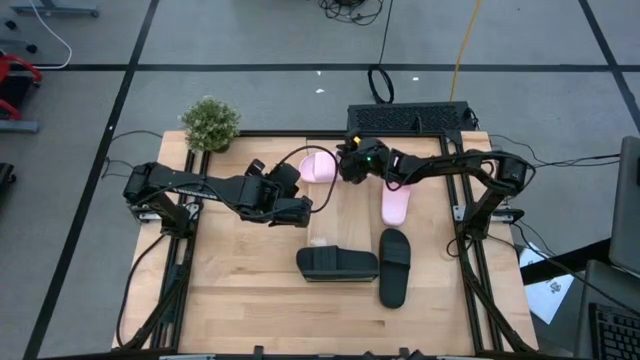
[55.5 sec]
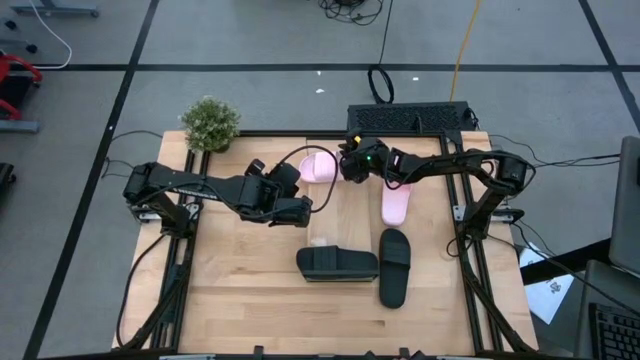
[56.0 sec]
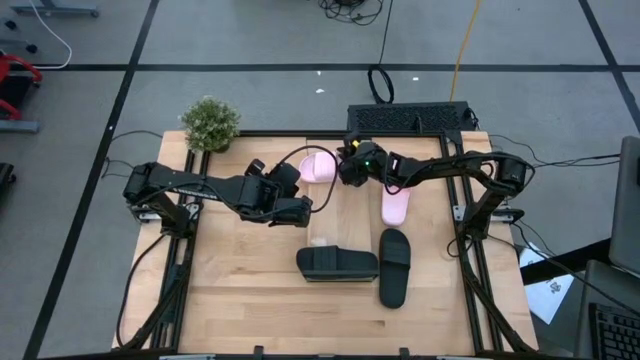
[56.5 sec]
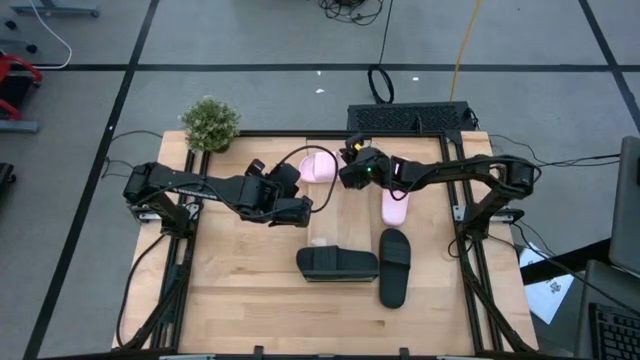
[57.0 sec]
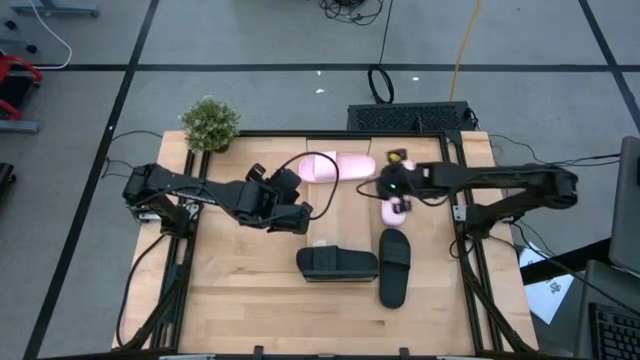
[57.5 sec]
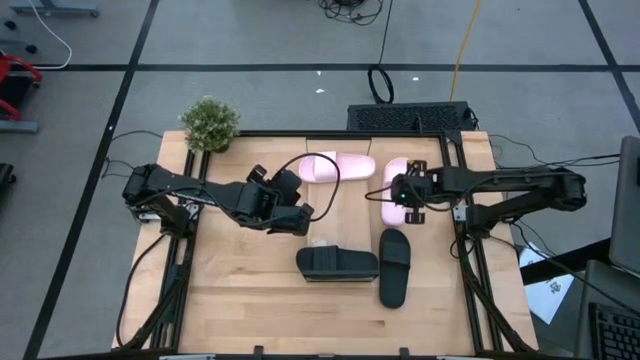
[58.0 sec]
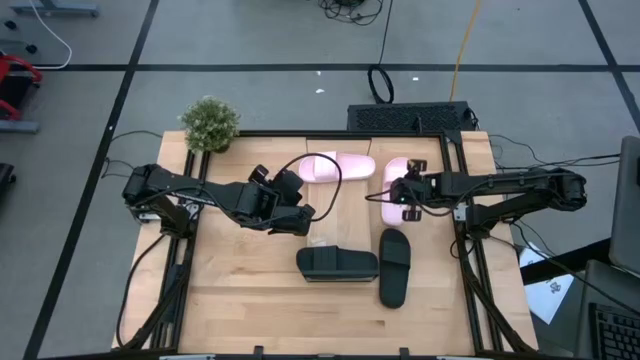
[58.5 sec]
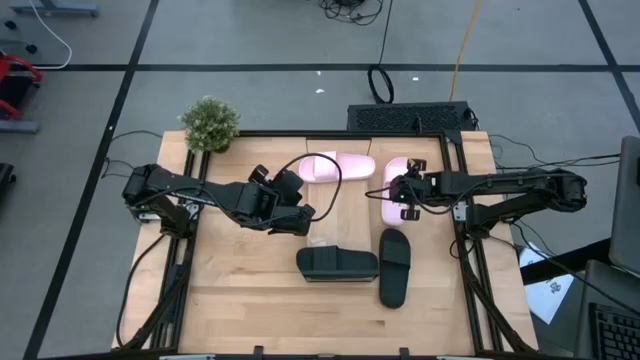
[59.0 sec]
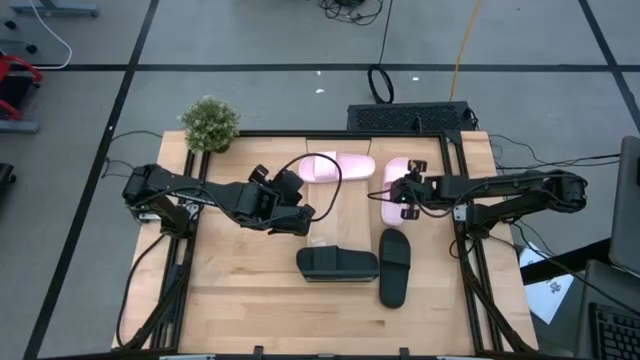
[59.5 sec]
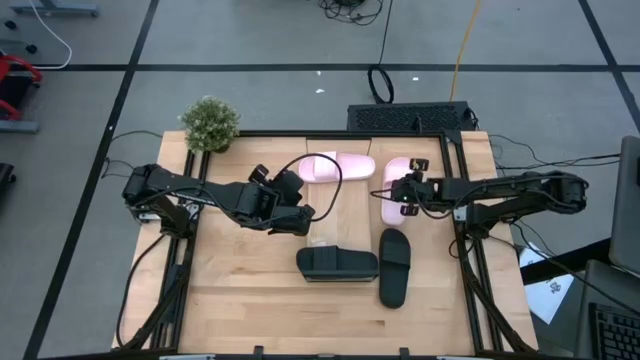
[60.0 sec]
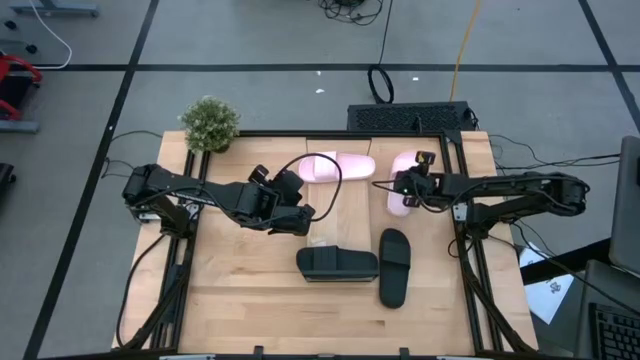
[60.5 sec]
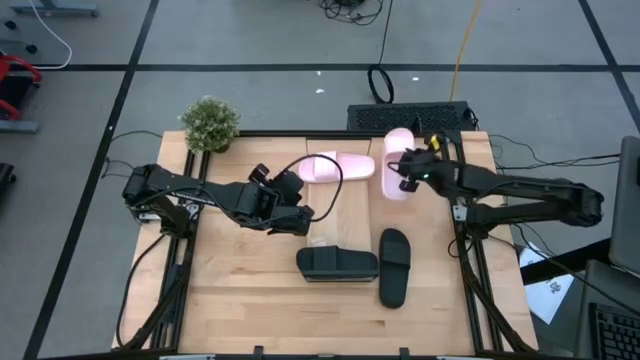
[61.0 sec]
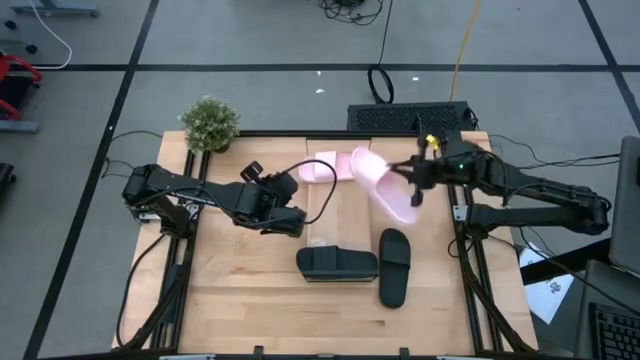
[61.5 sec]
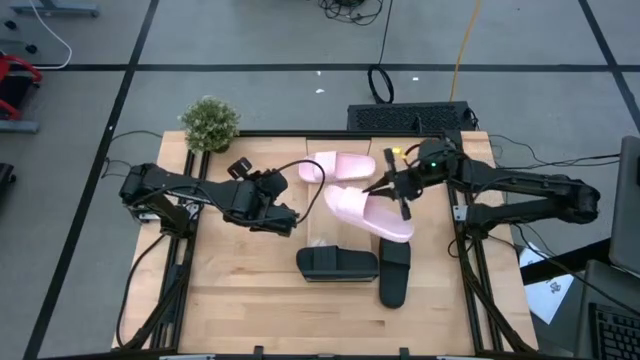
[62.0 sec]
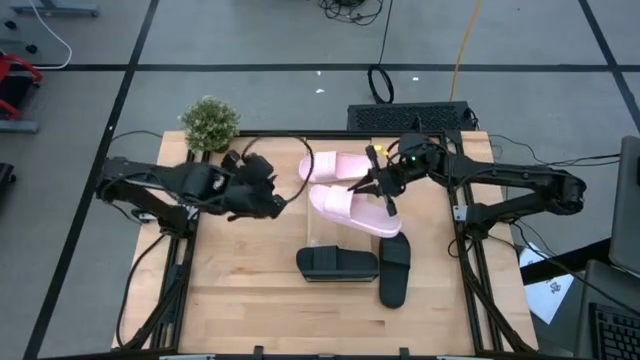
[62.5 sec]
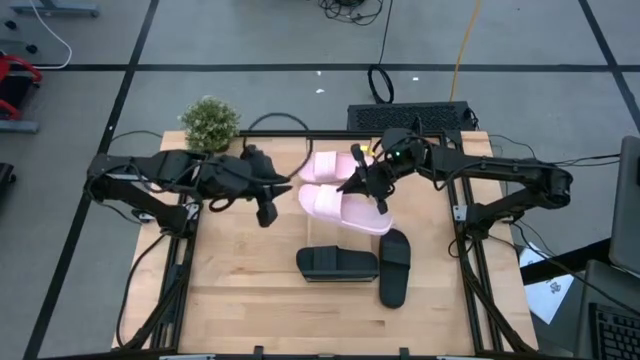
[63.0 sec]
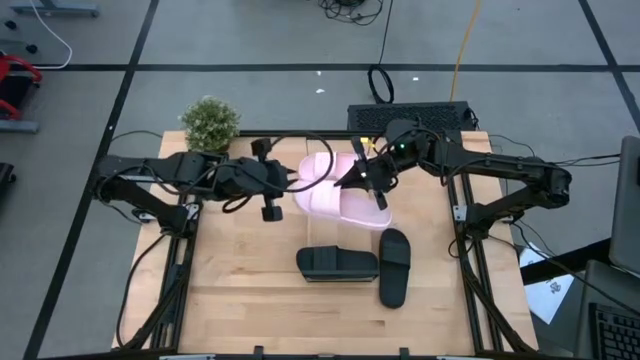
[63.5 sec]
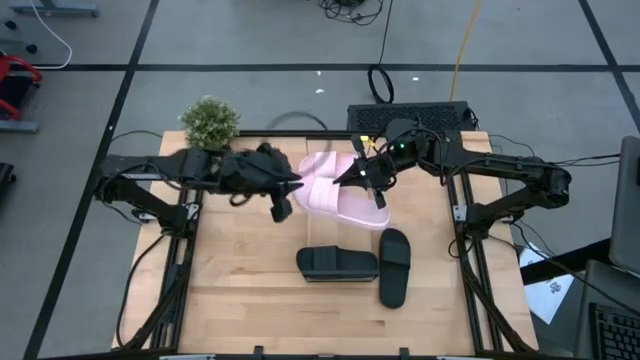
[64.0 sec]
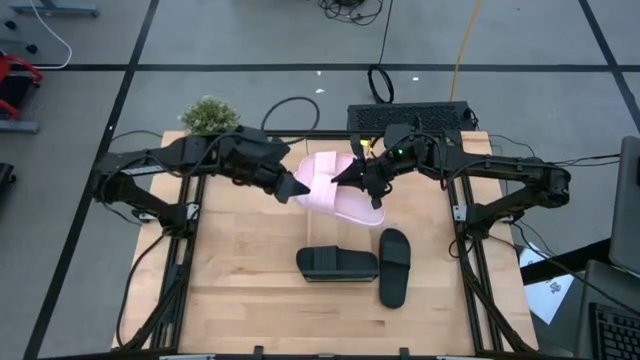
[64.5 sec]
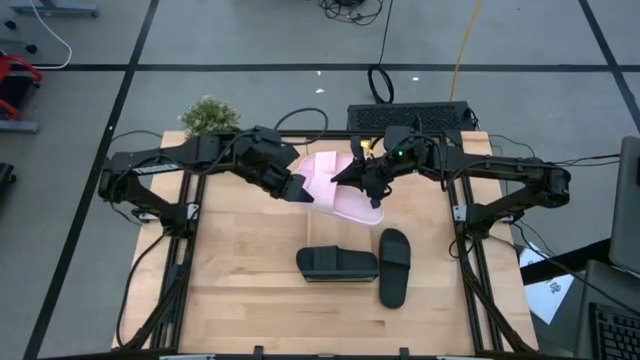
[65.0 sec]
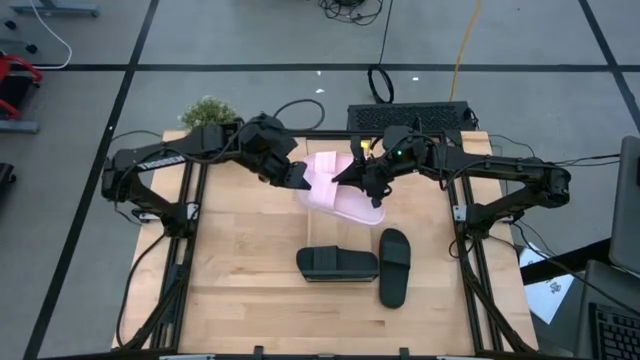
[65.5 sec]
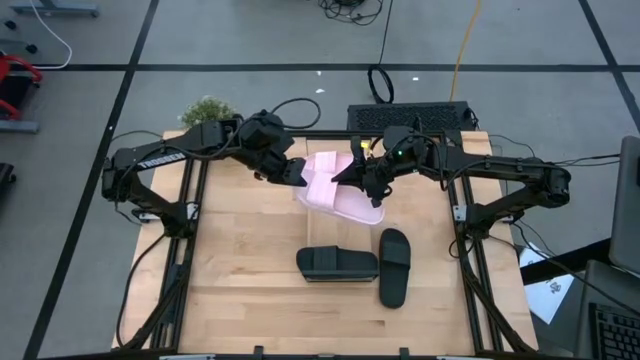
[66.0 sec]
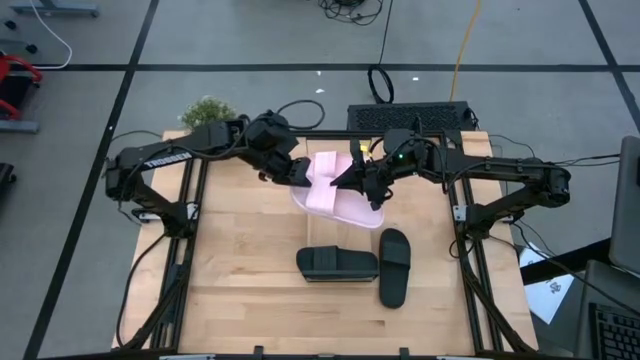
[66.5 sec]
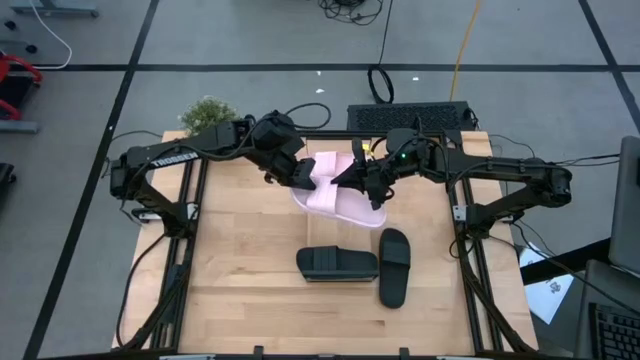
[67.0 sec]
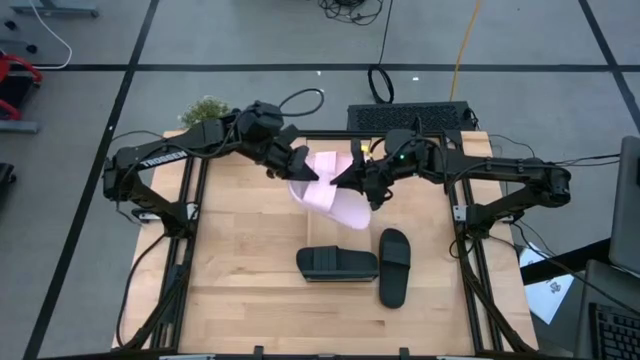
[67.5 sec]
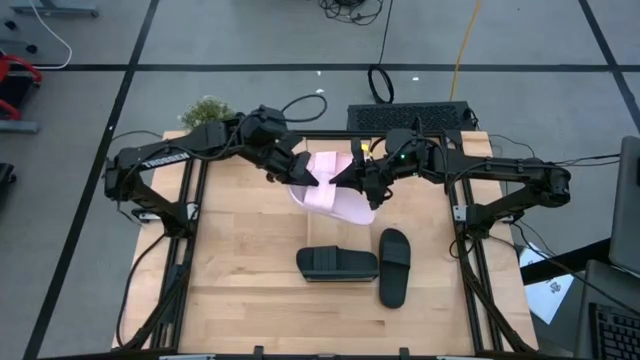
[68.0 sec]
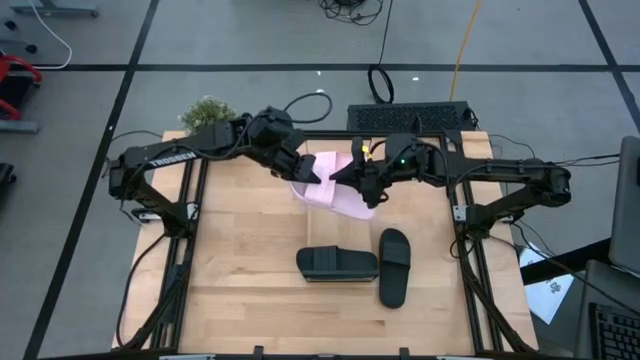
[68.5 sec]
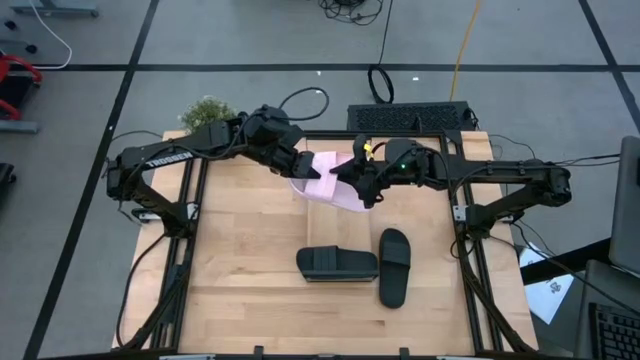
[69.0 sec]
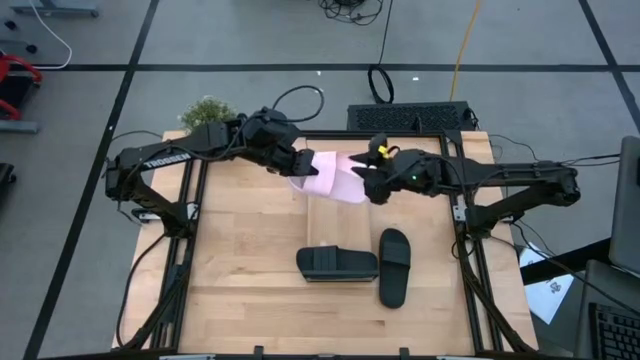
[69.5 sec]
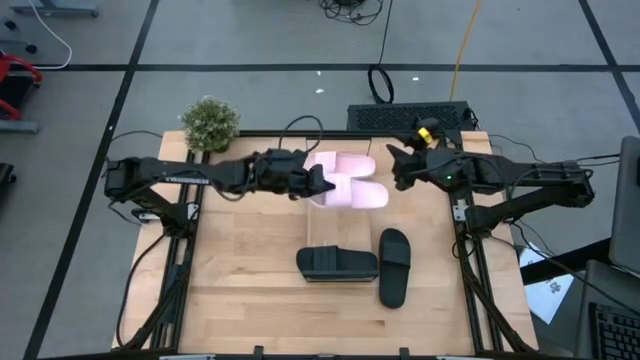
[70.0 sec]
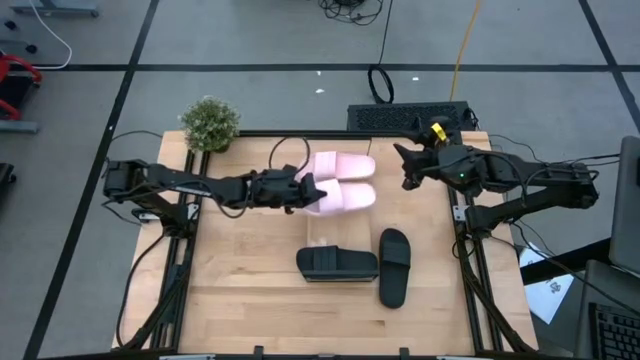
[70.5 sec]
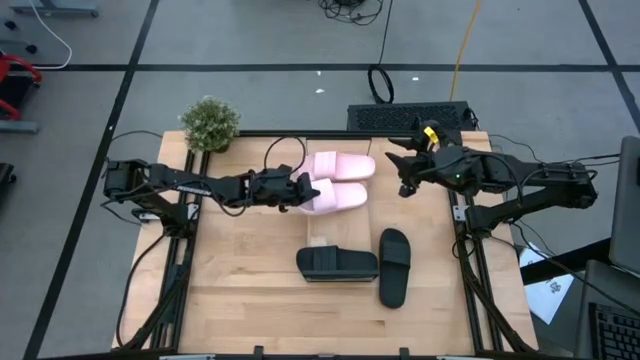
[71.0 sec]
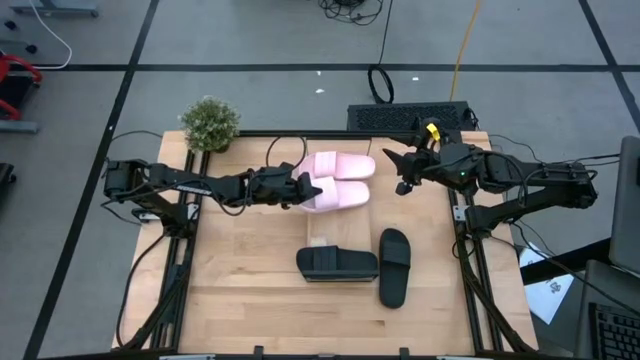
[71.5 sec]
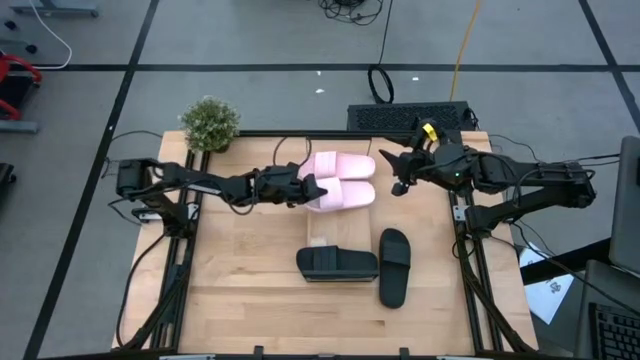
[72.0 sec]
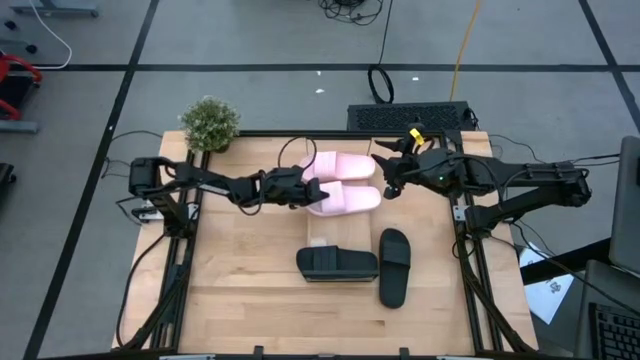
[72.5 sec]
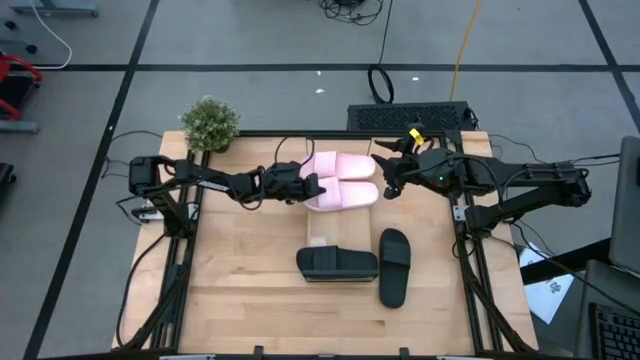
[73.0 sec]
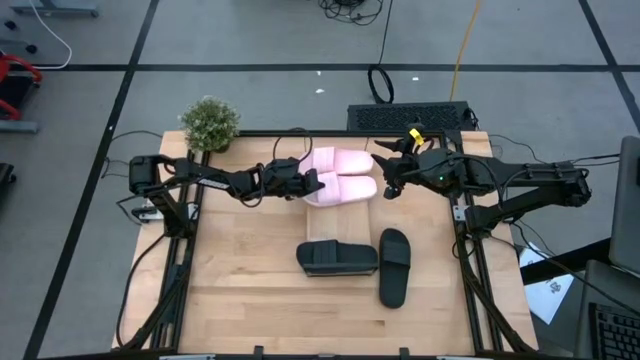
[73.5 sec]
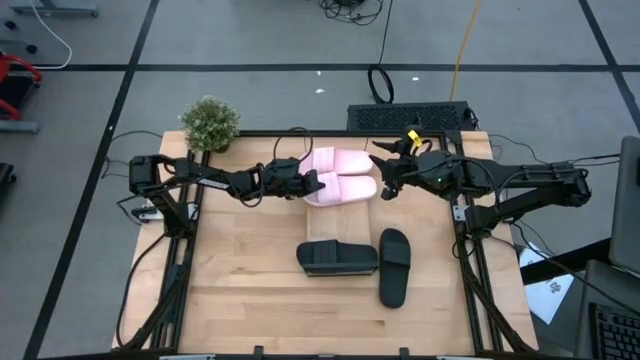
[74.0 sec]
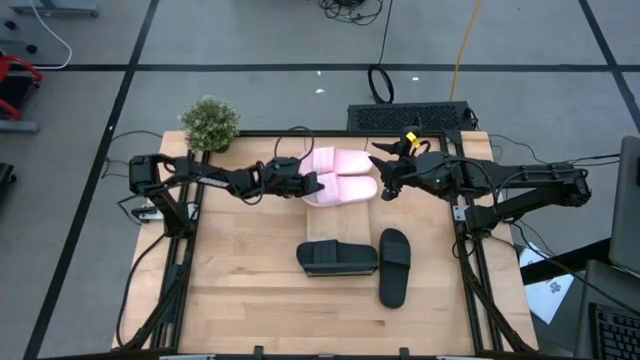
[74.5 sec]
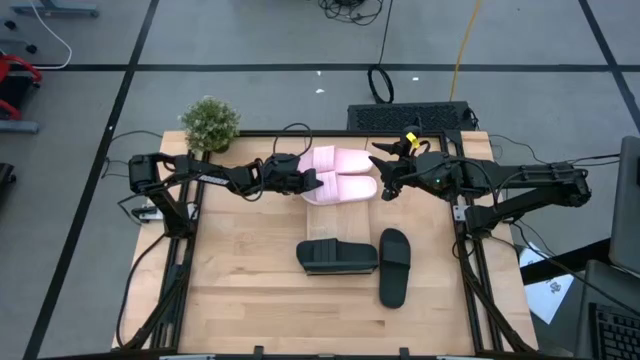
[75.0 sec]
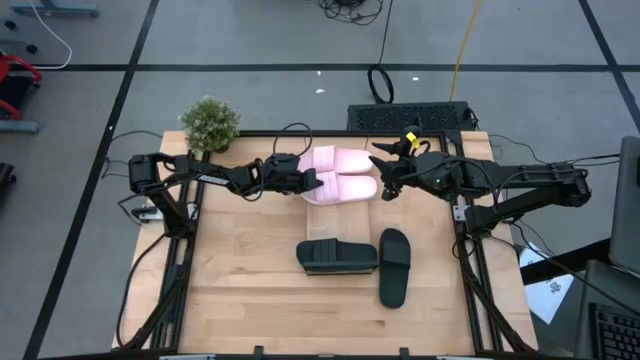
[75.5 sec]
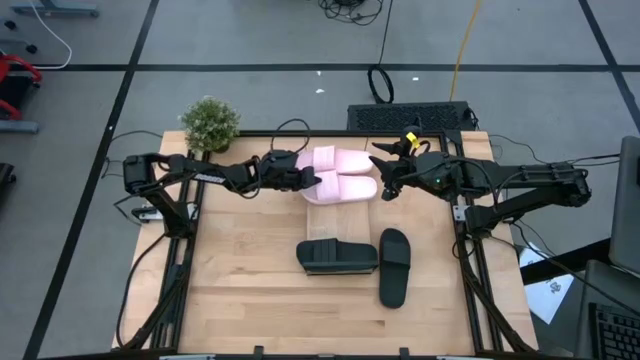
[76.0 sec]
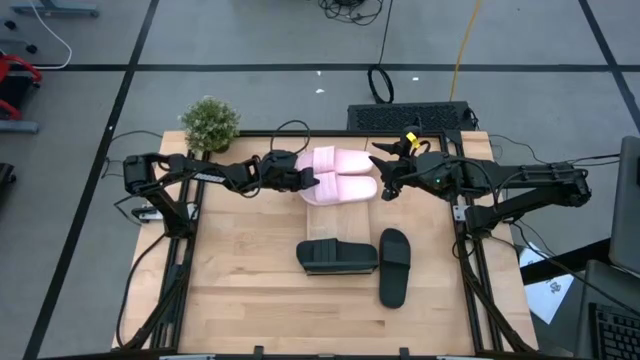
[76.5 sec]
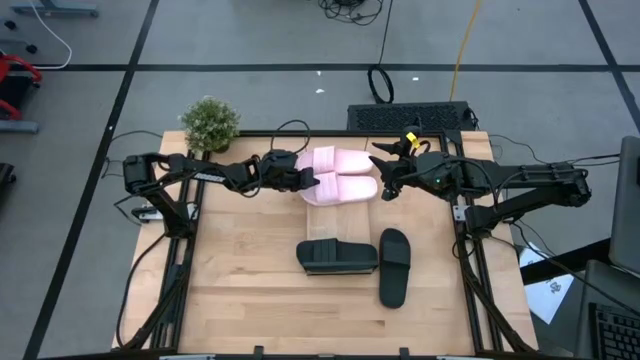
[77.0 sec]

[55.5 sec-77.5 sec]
Task: Pick and place slides into the shelf
Put the pink slipper on the shelf
